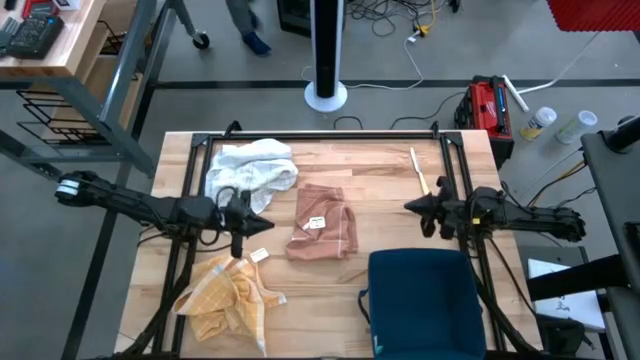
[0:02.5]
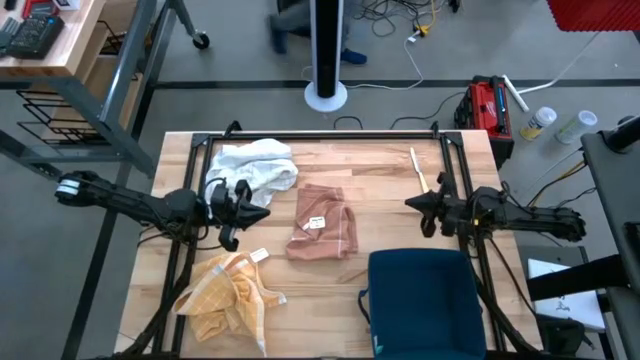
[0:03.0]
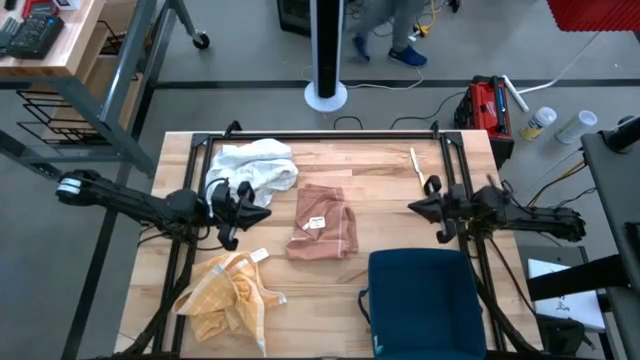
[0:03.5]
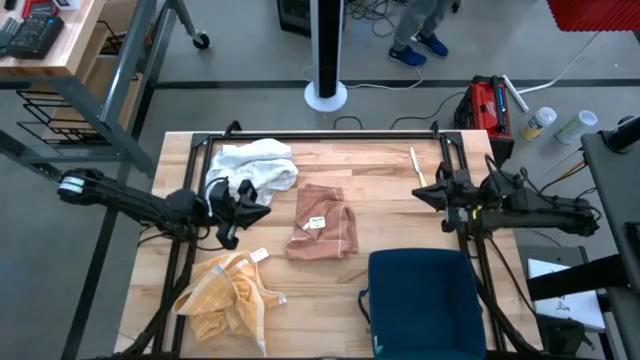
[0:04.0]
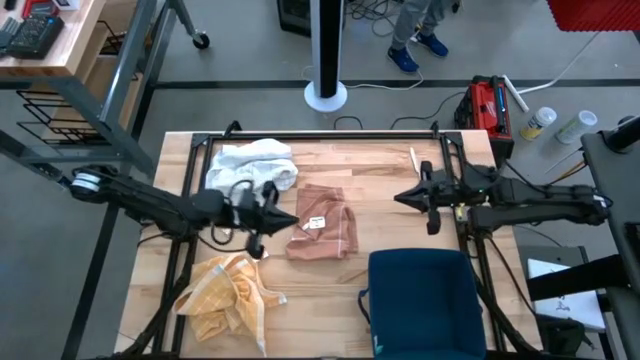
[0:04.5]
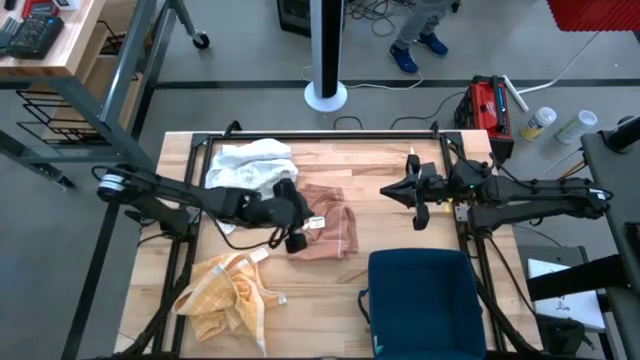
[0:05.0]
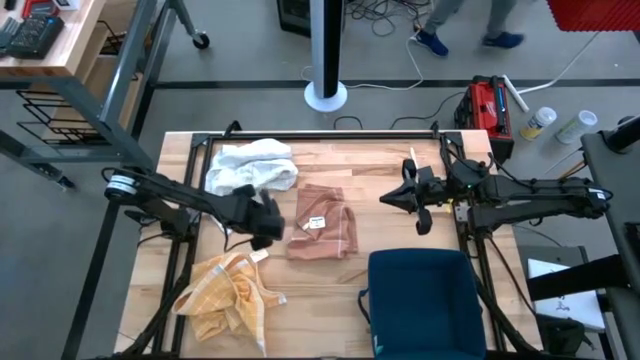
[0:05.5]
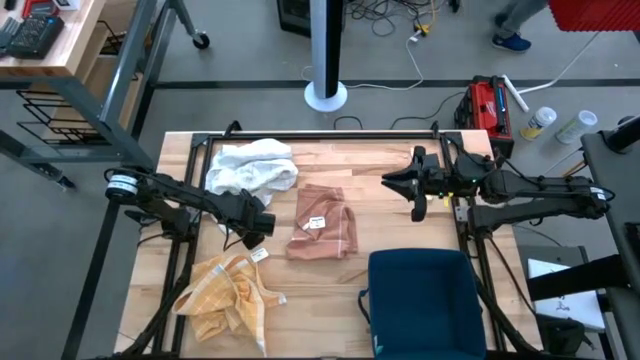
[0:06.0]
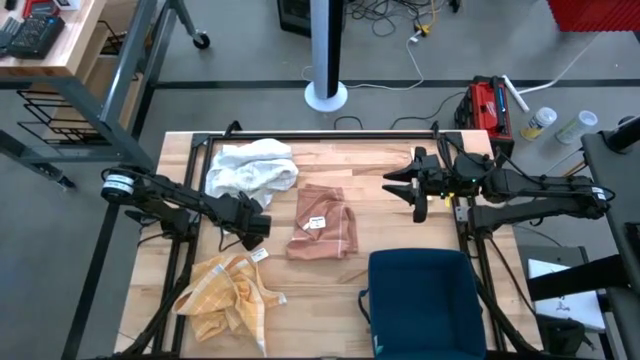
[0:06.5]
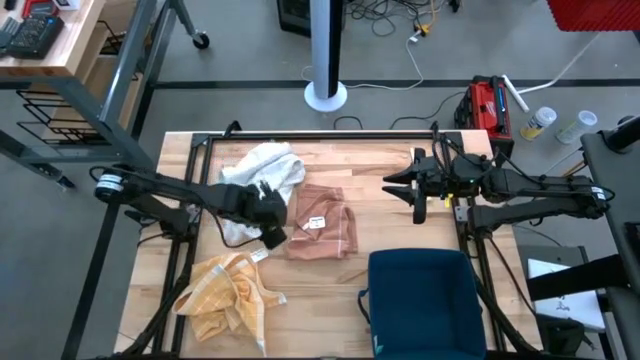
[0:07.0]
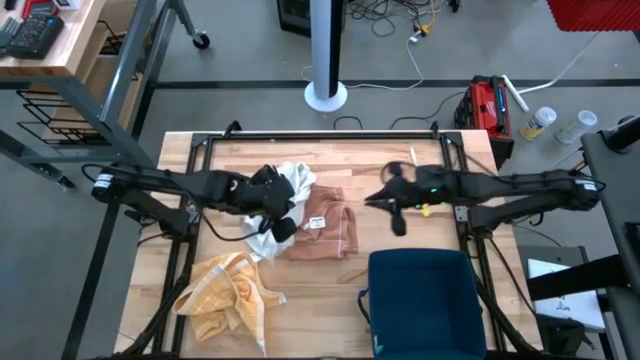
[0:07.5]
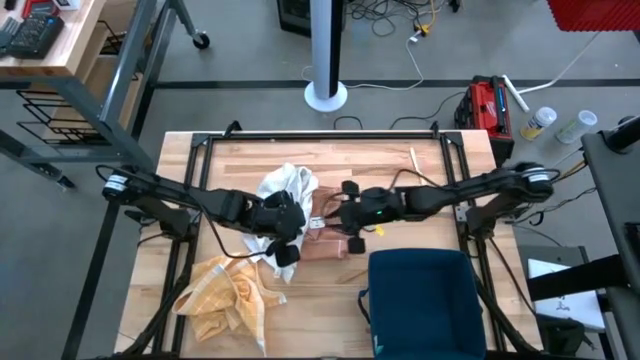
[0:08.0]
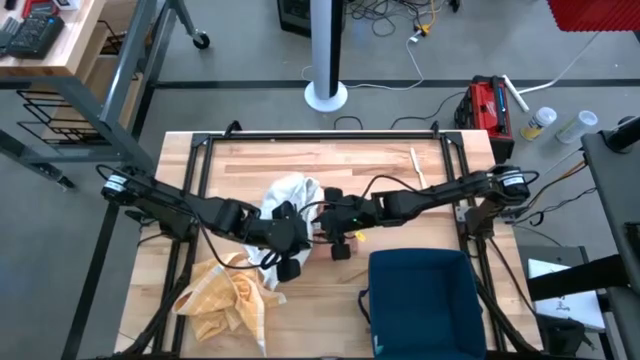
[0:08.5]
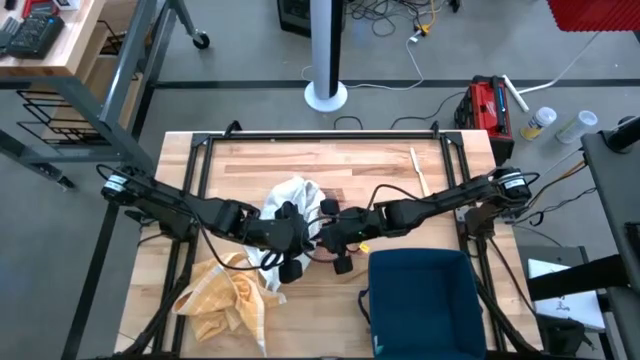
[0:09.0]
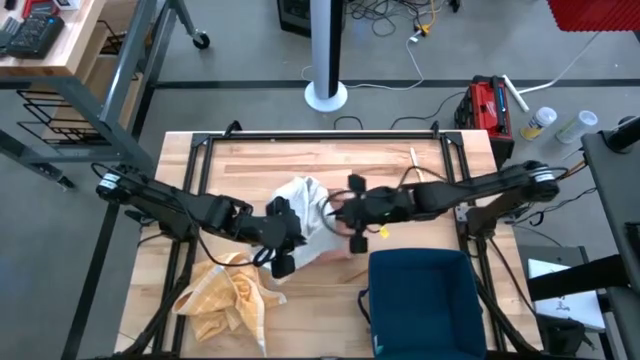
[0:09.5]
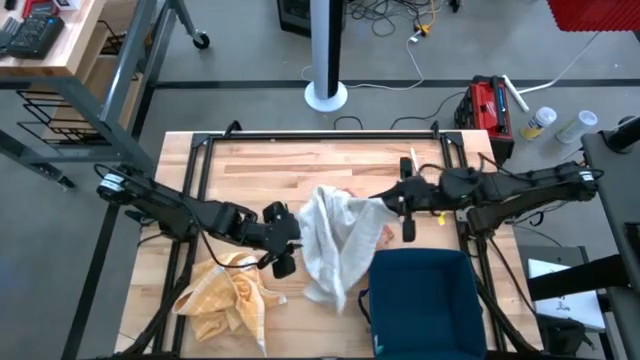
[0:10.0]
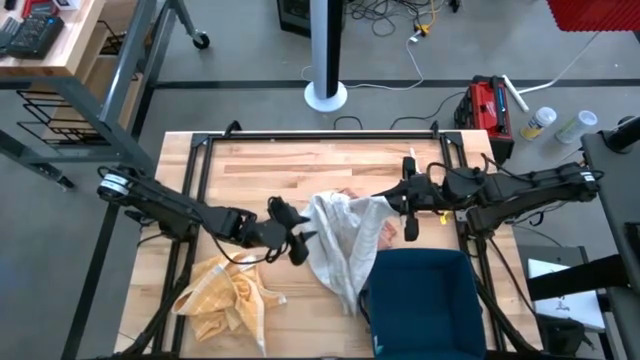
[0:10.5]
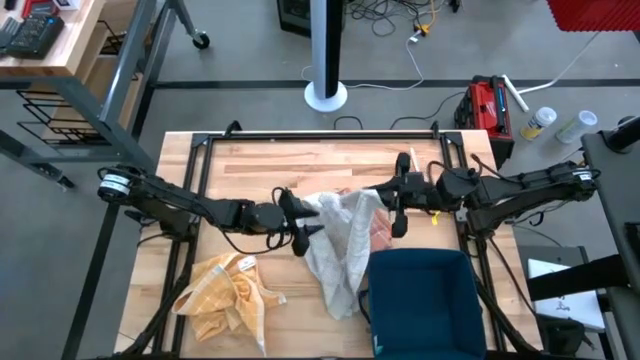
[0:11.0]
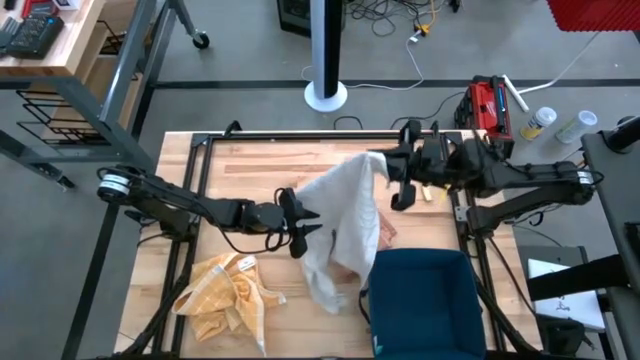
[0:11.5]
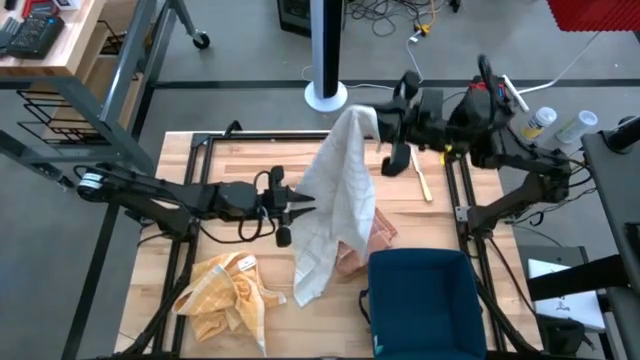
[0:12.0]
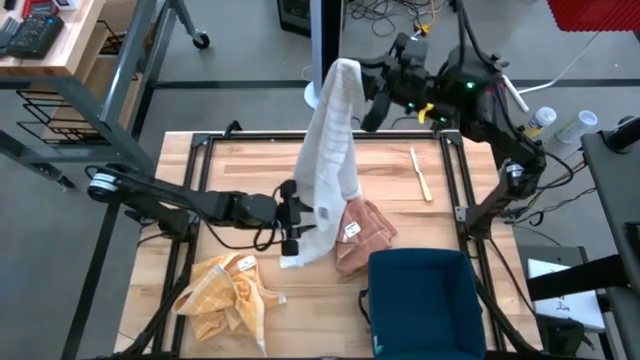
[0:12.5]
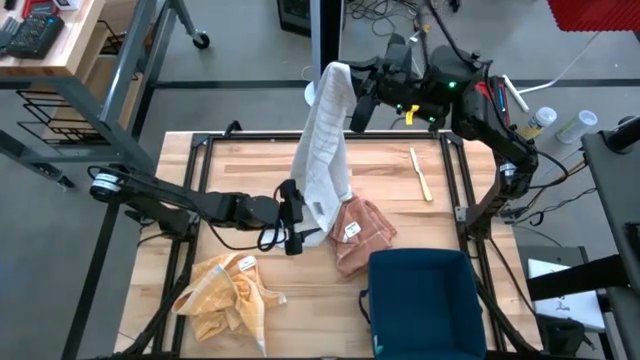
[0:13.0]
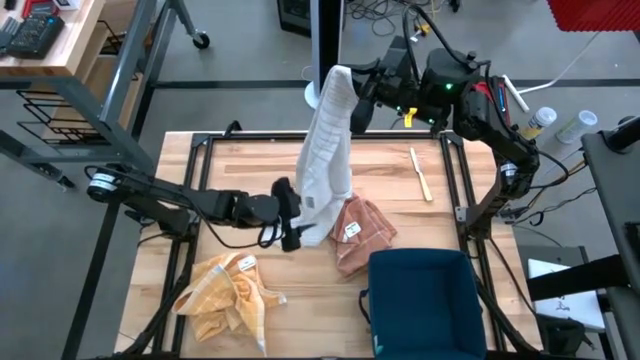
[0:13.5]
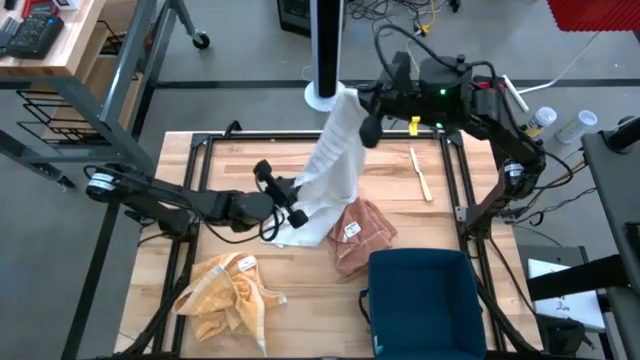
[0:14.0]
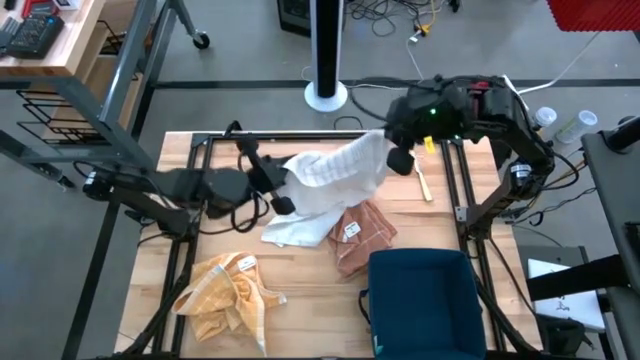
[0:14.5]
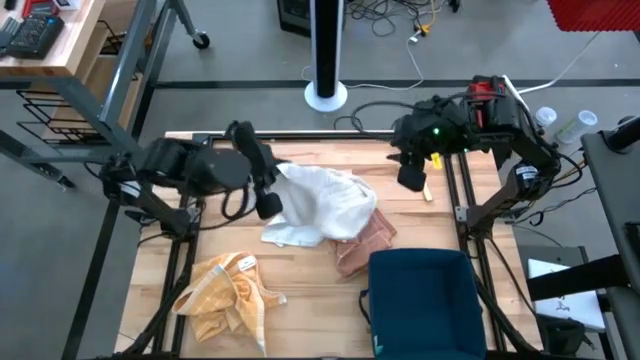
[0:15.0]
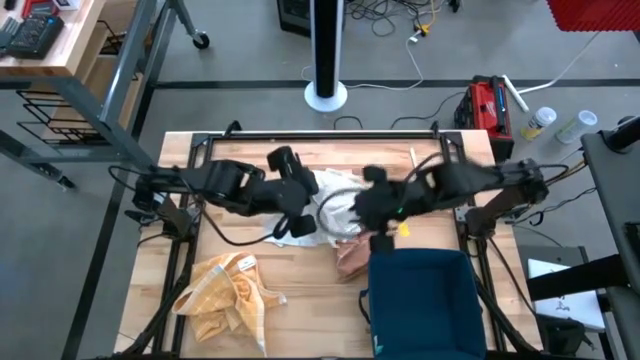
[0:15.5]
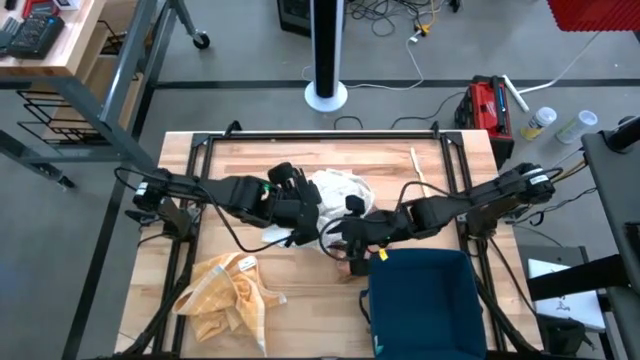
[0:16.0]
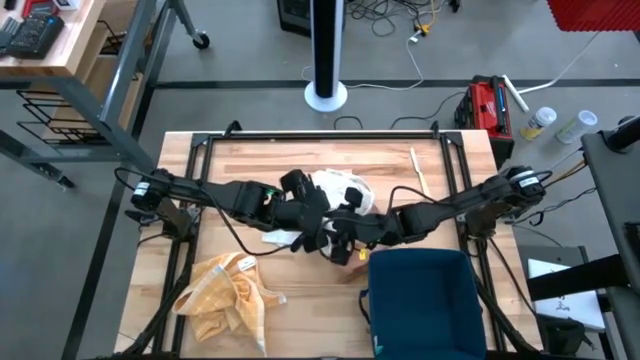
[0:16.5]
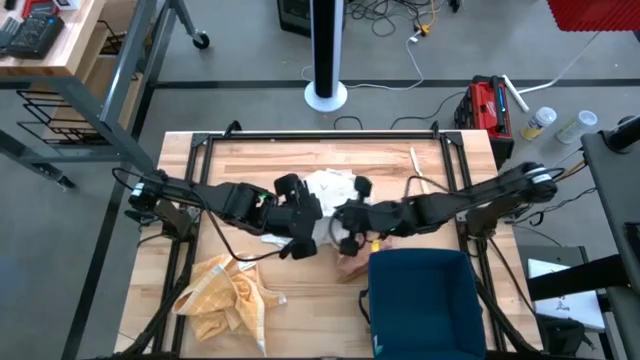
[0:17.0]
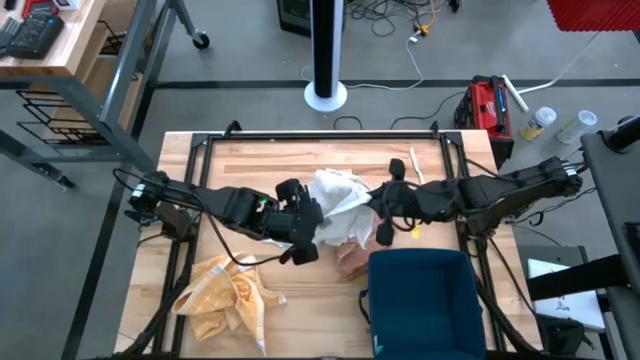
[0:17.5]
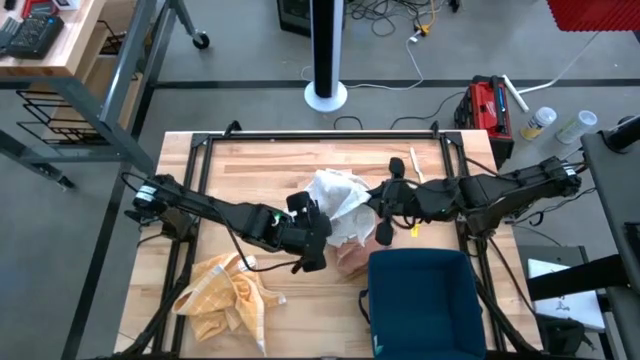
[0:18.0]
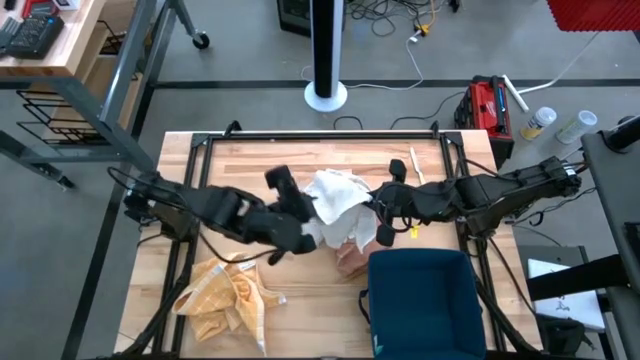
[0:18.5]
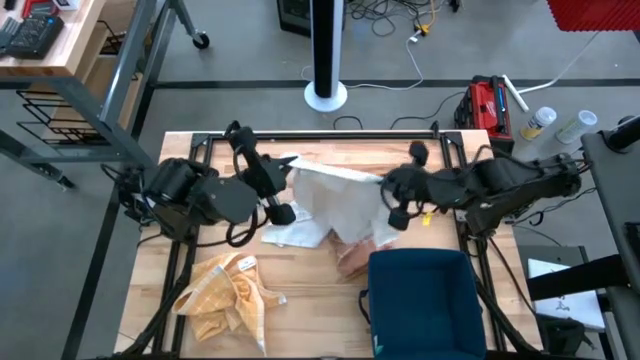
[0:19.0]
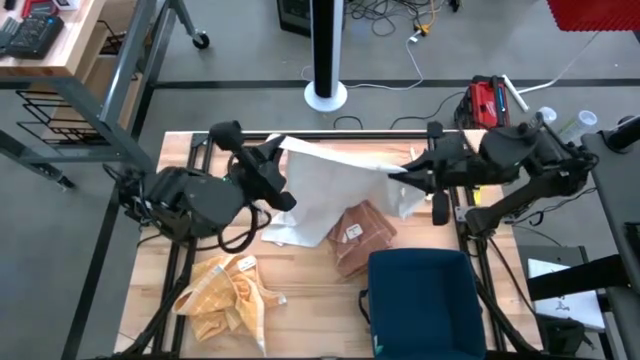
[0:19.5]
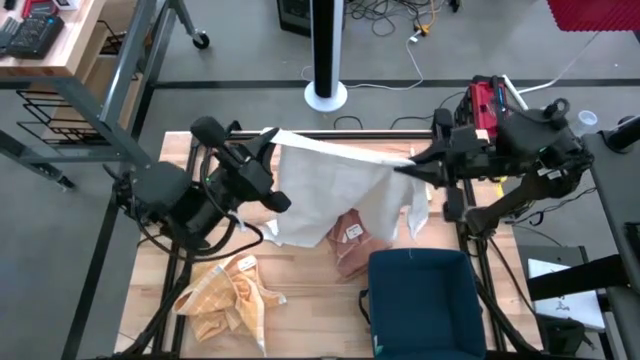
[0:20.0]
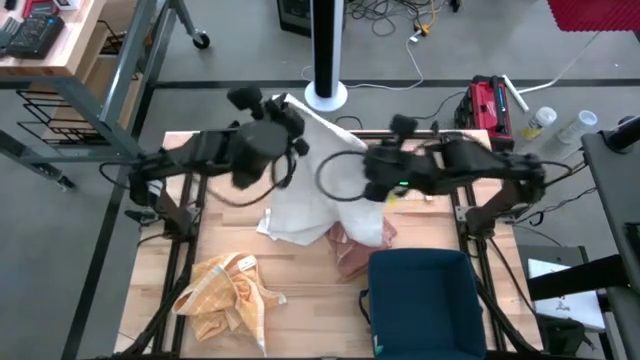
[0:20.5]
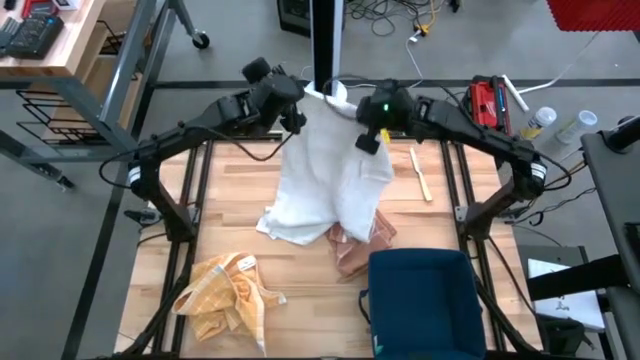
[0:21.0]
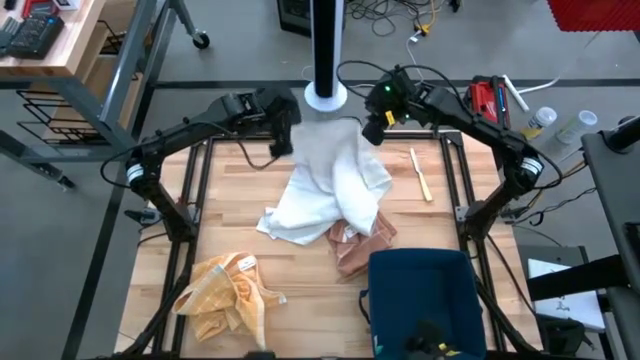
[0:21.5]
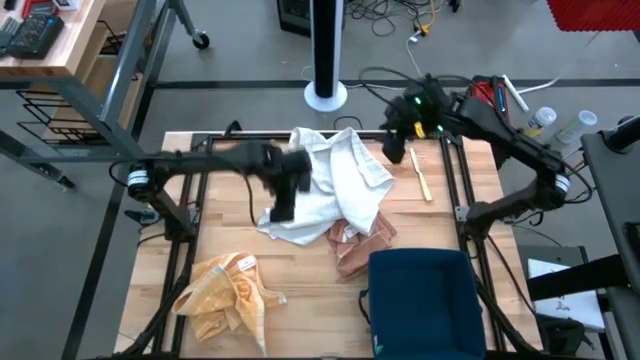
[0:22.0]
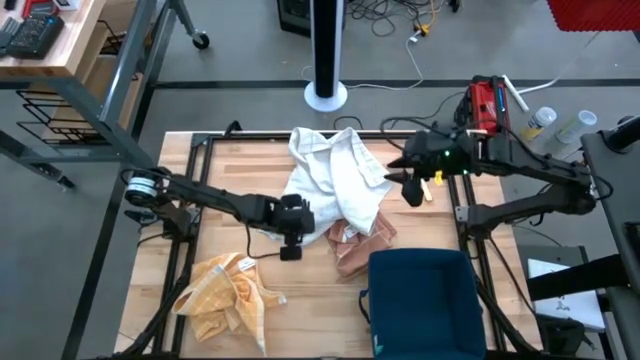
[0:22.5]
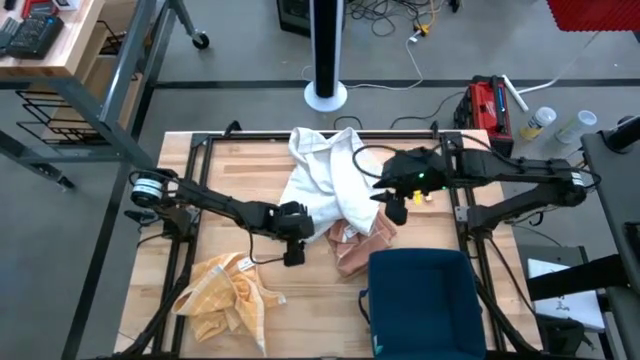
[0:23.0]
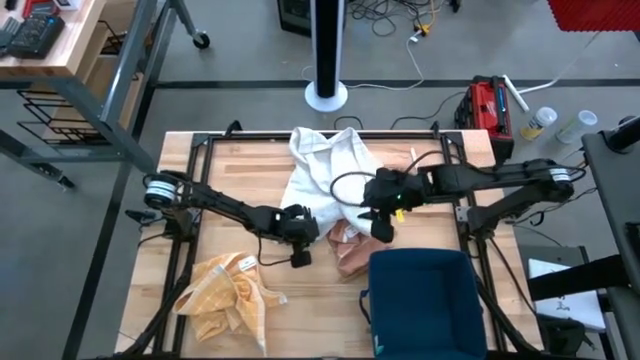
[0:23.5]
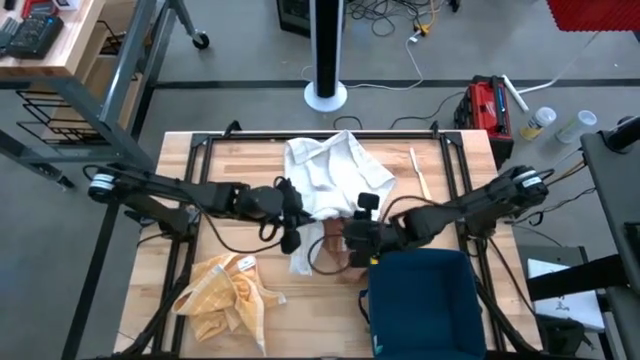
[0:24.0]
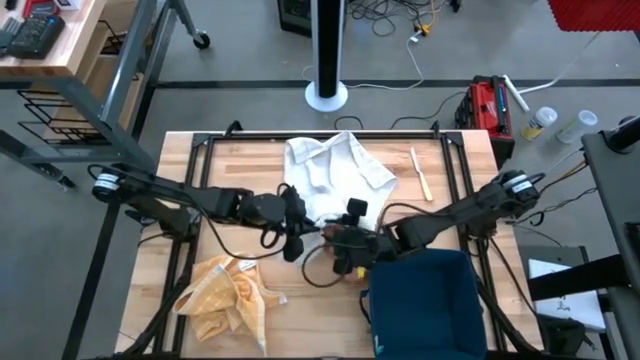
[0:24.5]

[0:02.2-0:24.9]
Task: Fold towel
Fold the white towel
